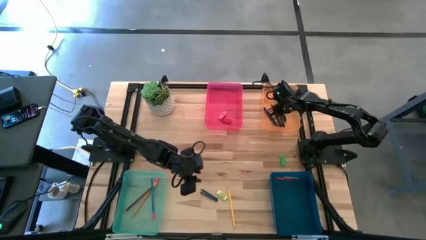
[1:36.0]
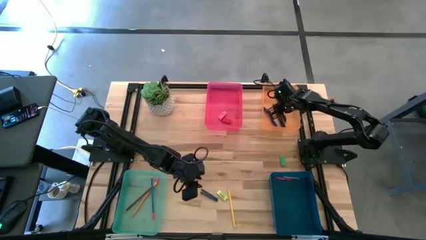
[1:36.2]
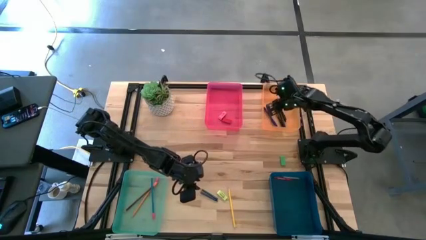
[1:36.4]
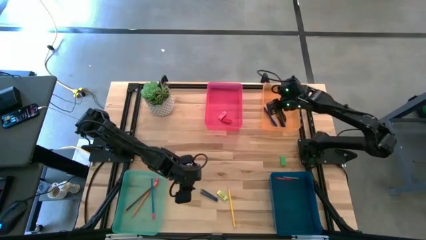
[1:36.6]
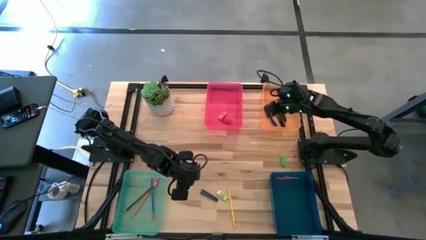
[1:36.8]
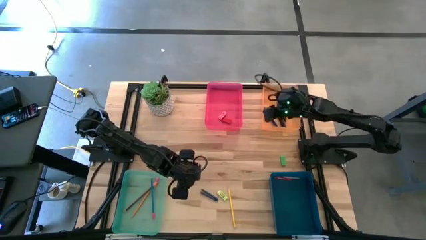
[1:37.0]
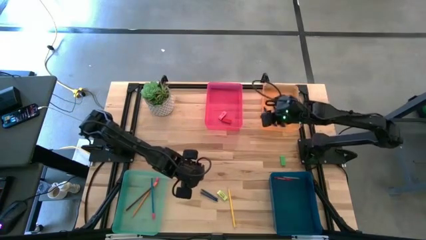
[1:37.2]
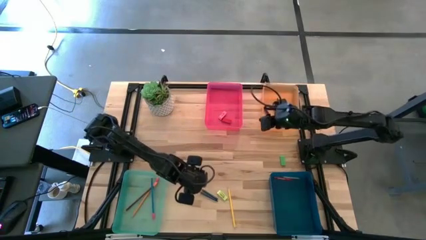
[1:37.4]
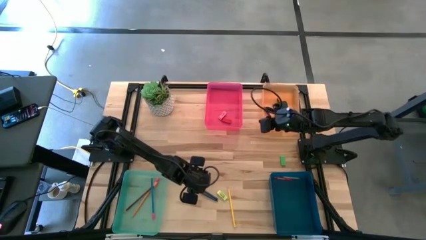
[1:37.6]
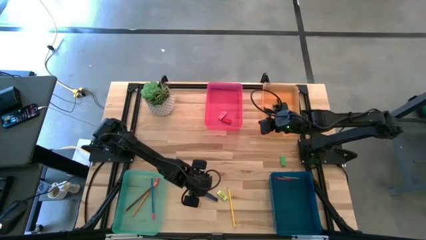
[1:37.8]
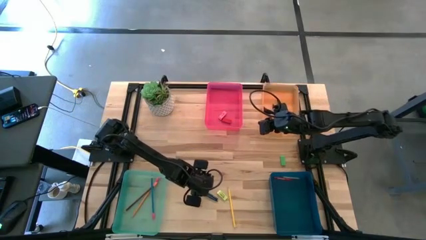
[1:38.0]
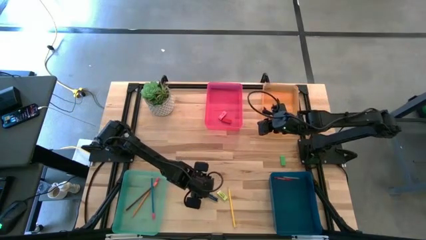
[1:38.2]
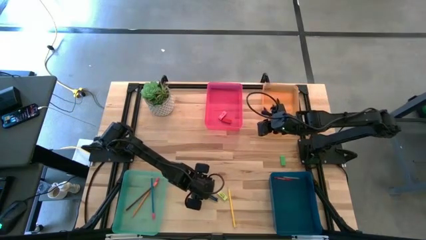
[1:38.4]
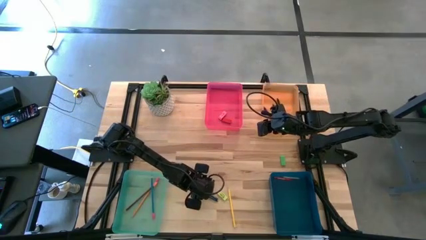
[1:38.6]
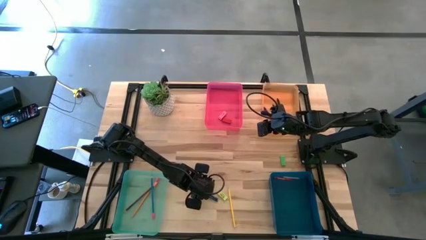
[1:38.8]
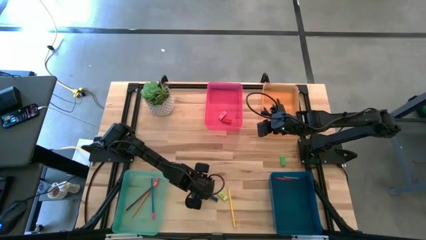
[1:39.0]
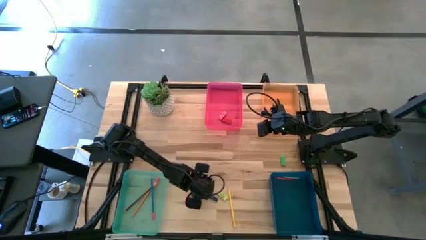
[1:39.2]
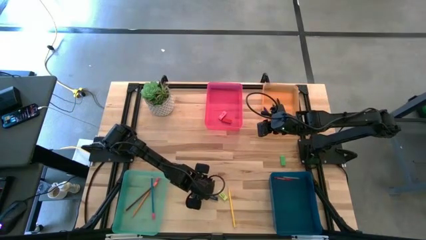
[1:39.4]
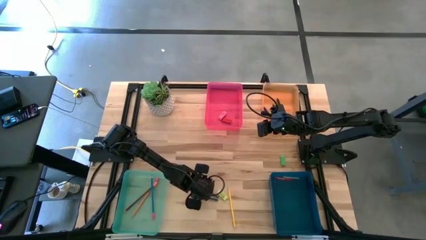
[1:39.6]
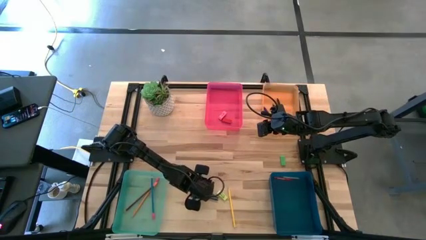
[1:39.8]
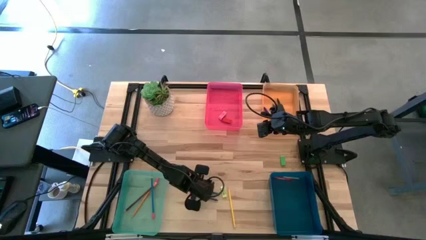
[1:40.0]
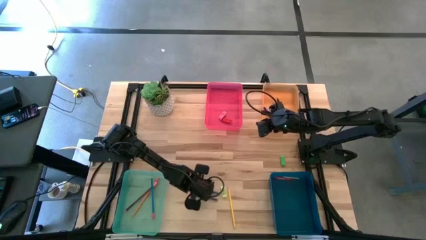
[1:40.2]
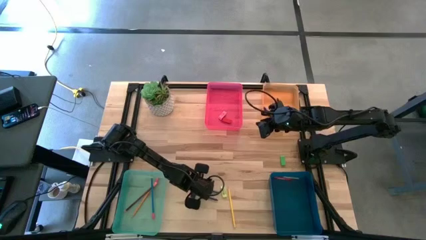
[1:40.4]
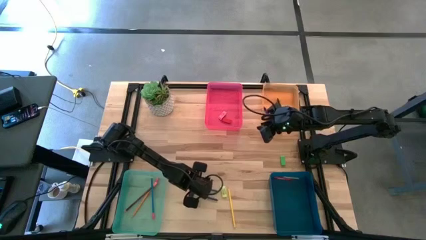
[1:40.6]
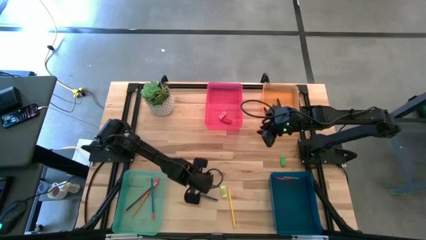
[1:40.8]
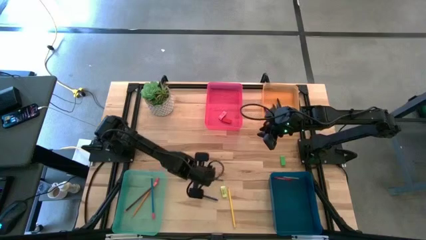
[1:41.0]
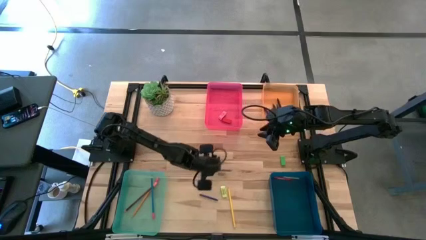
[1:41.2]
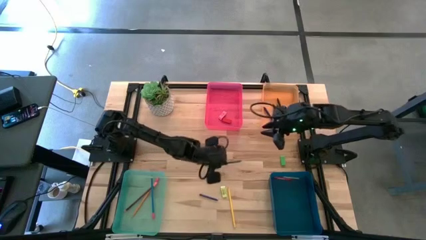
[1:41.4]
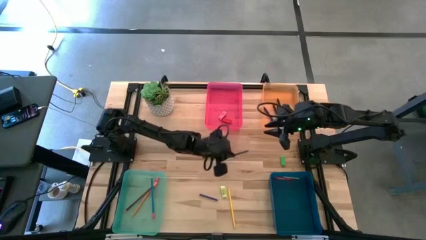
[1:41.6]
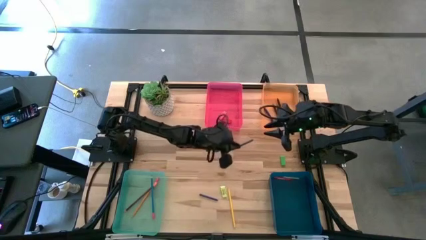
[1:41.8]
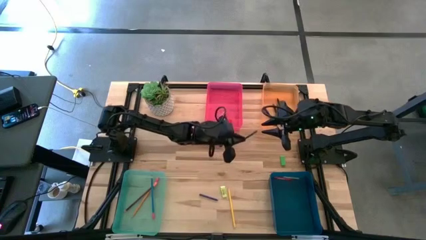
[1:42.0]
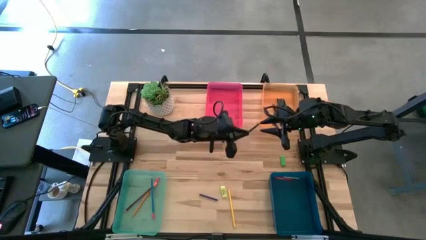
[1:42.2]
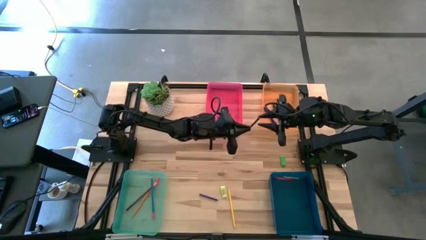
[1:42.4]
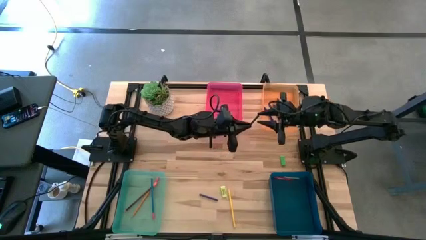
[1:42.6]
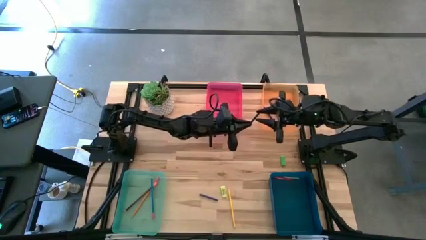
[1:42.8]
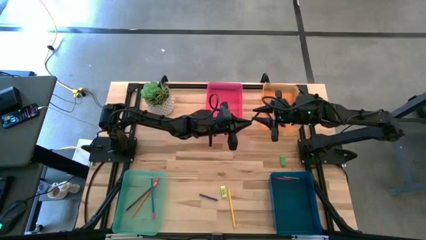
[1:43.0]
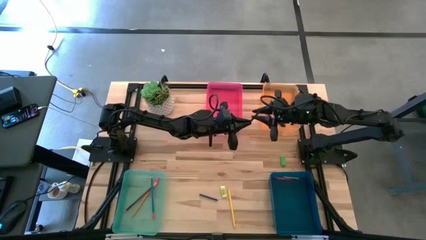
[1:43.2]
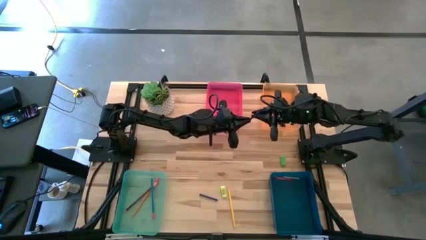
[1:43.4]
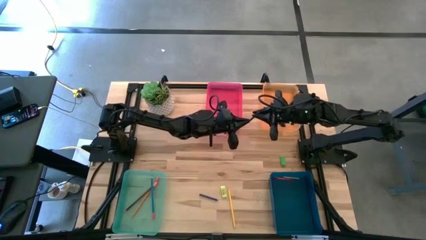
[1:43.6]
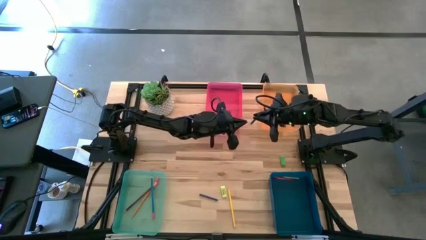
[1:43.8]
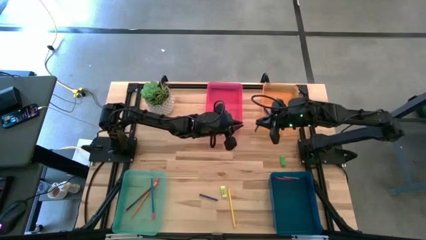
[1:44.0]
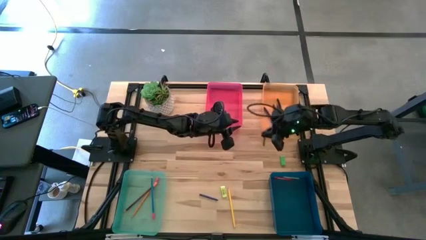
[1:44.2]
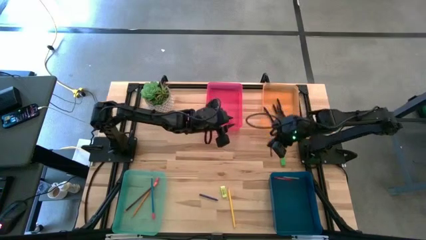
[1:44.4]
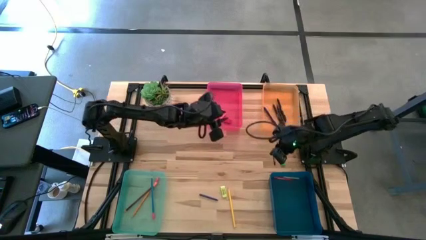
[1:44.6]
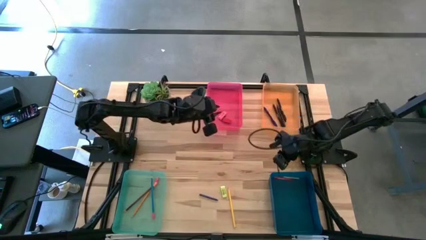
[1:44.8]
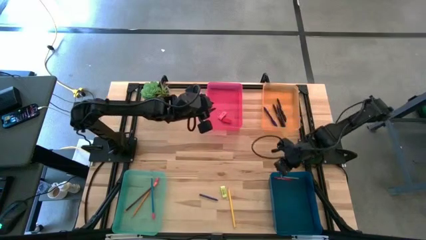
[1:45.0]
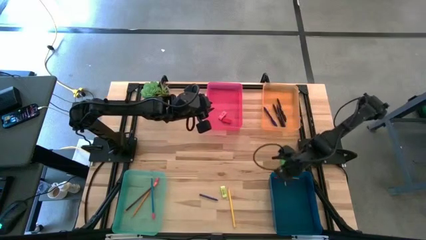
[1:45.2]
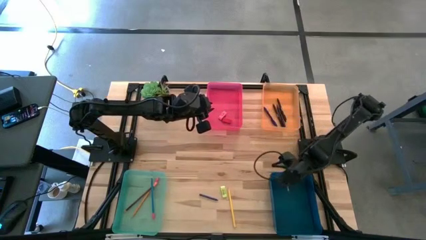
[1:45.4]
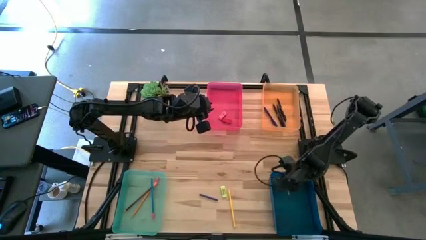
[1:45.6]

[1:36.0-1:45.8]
Task: Sort crayons/erasers/pens/pencils in bins
Put the green crayon into the blue bin

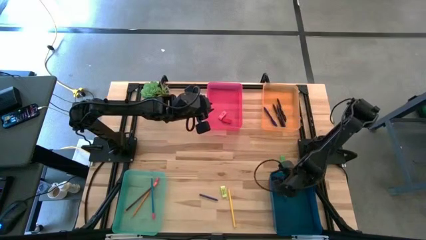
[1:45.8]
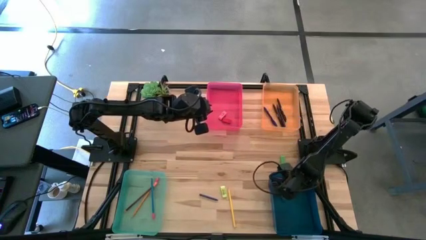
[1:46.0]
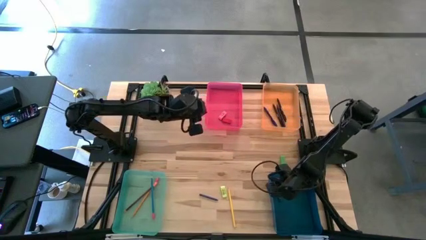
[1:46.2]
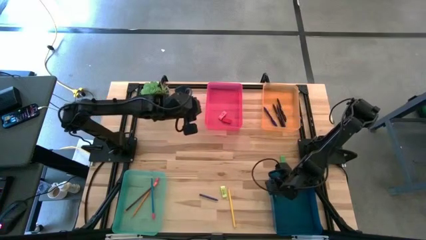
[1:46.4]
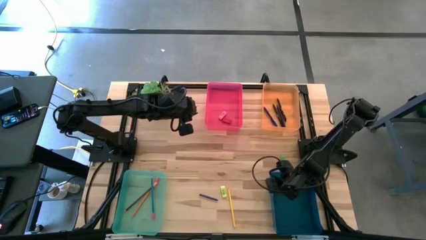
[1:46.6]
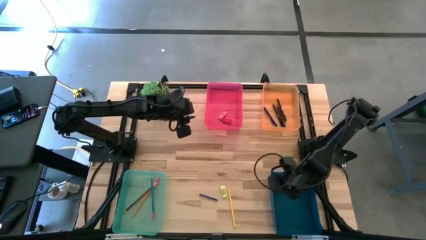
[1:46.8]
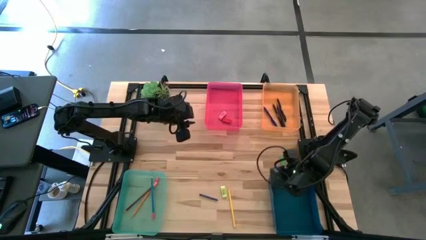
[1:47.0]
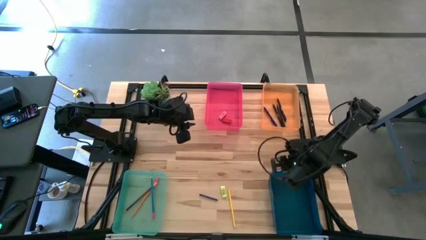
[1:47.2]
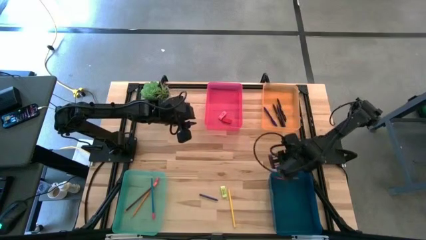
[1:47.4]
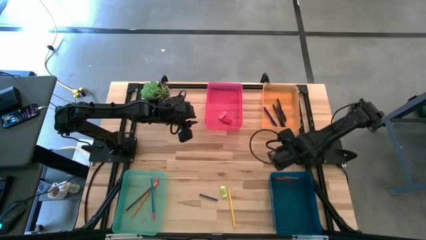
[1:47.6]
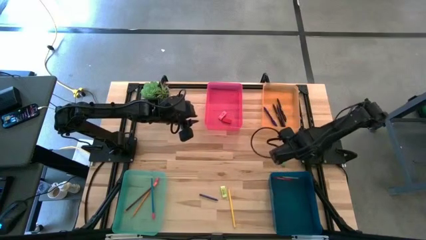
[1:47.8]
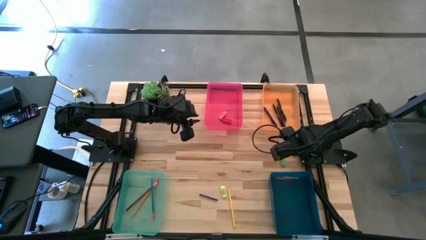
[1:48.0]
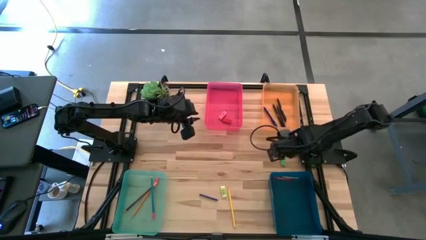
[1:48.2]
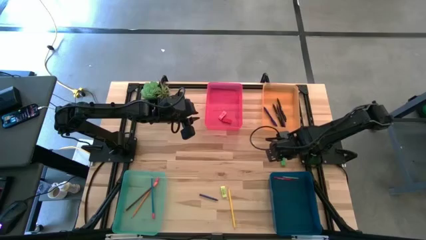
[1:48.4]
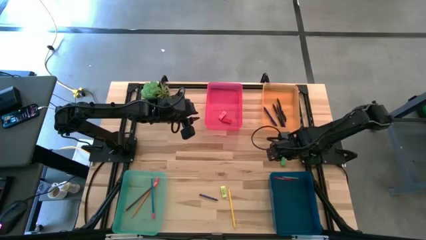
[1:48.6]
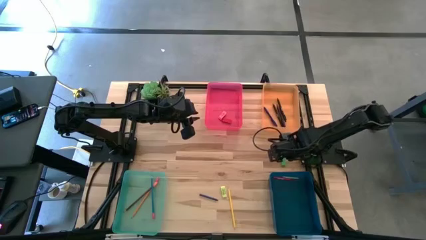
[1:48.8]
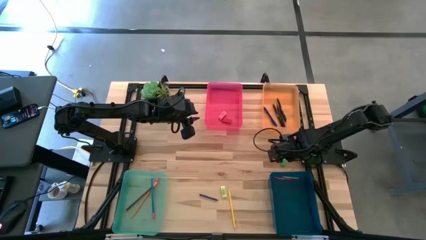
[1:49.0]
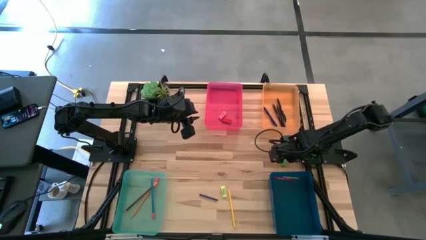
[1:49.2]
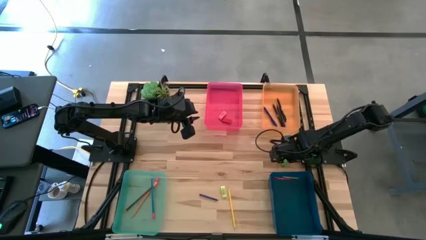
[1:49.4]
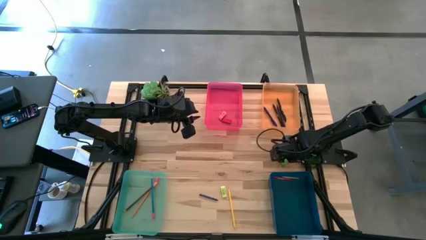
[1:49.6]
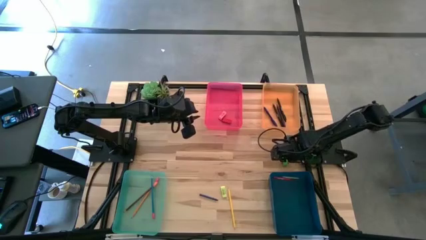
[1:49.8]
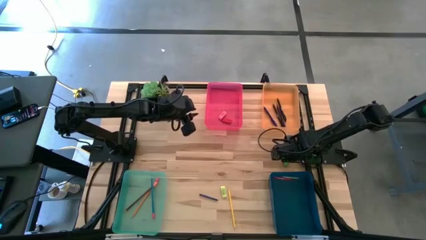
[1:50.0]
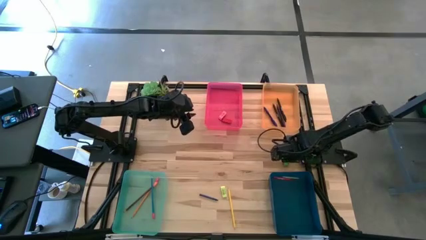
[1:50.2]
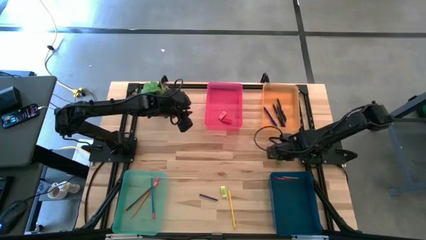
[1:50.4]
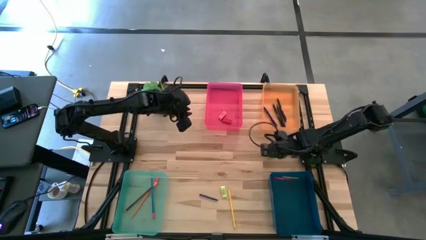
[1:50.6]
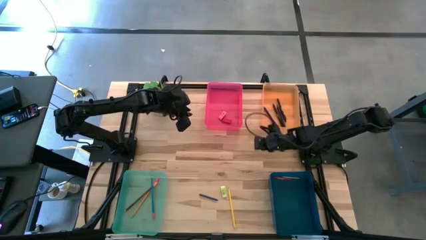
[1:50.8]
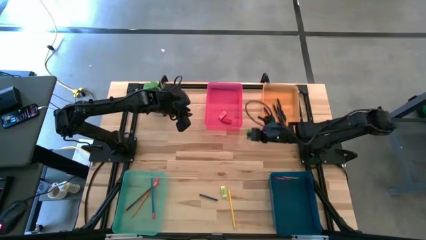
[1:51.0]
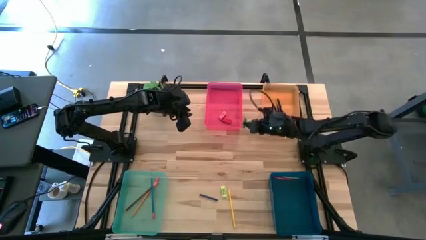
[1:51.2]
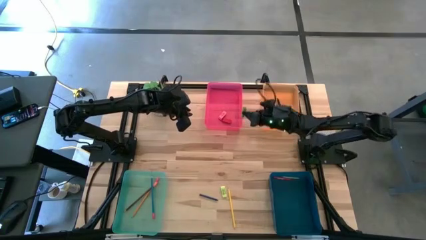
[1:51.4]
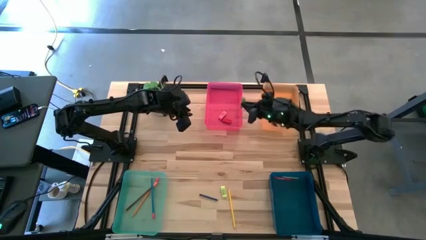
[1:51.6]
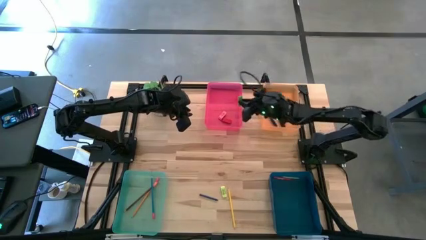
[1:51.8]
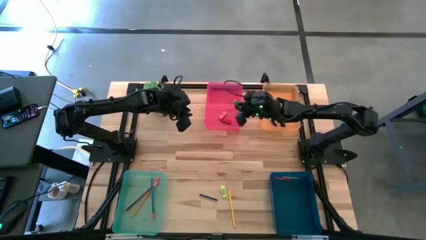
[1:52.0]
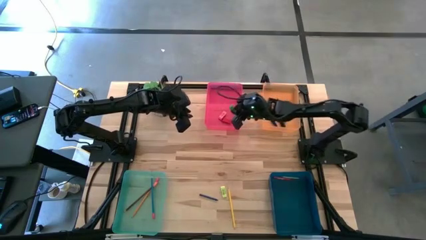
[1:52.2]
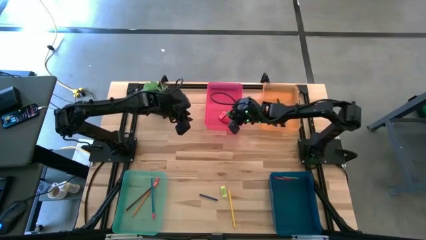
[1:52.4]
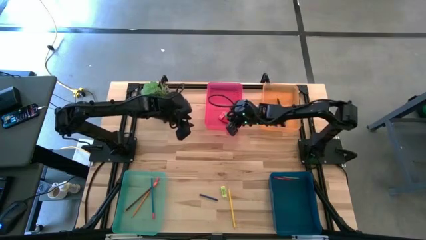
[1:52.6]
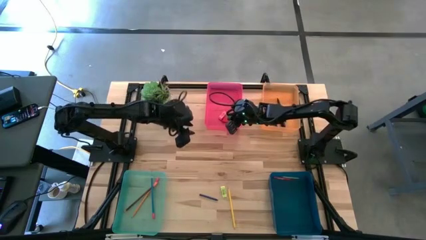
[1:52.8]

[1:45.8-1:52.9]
Put the green eraser into the pink bin
